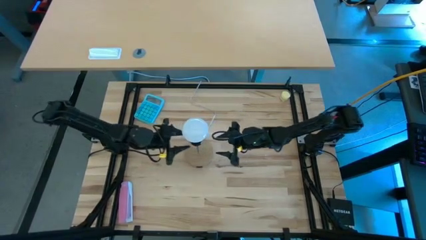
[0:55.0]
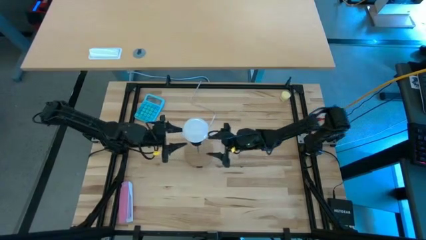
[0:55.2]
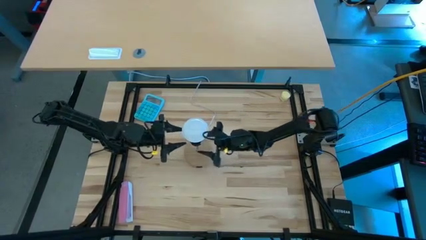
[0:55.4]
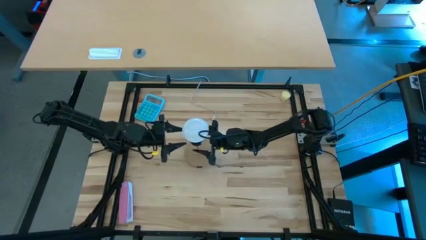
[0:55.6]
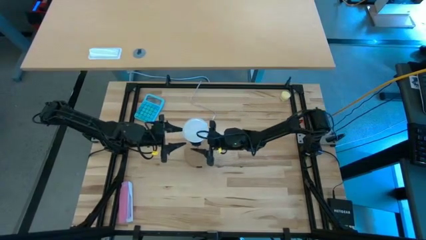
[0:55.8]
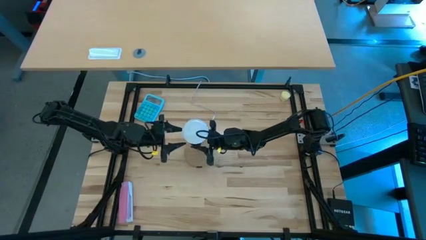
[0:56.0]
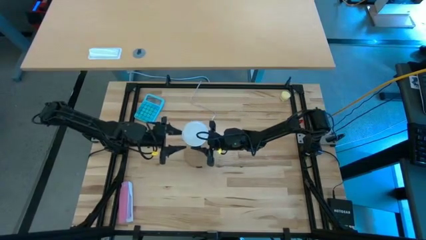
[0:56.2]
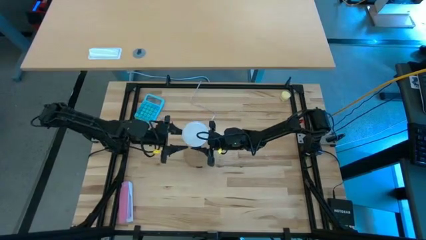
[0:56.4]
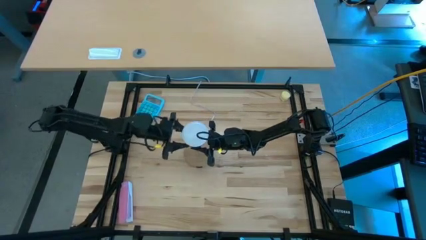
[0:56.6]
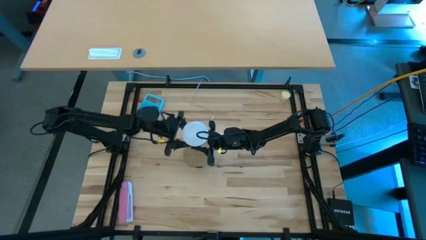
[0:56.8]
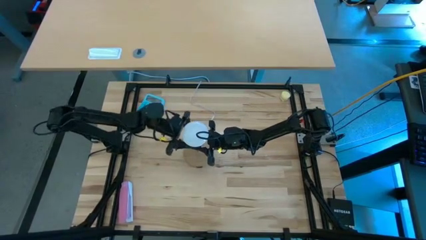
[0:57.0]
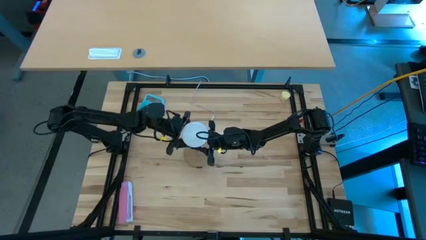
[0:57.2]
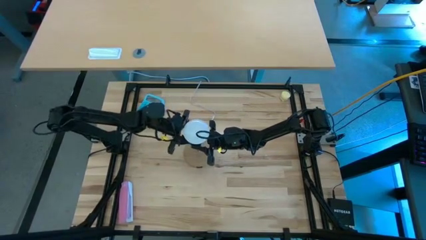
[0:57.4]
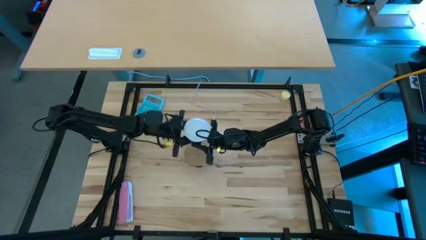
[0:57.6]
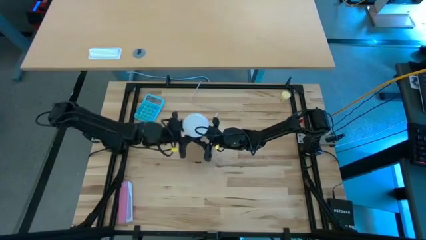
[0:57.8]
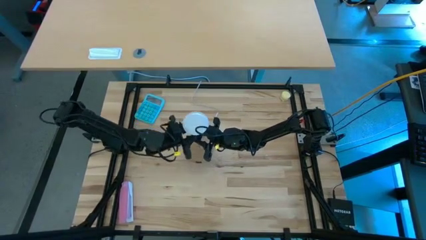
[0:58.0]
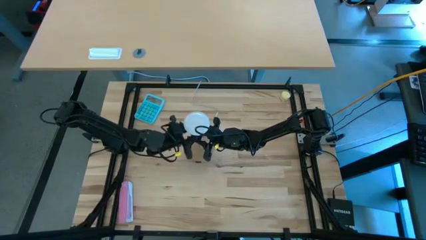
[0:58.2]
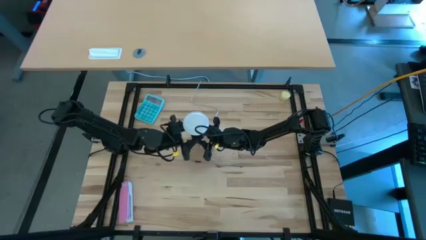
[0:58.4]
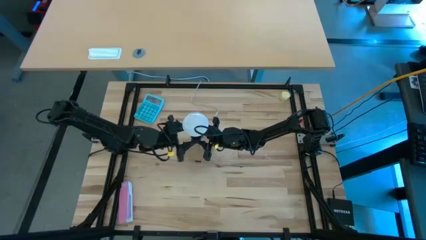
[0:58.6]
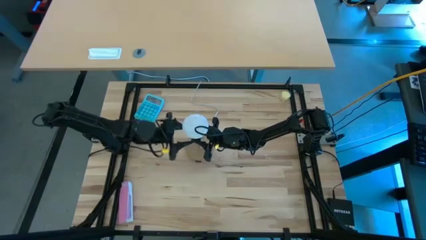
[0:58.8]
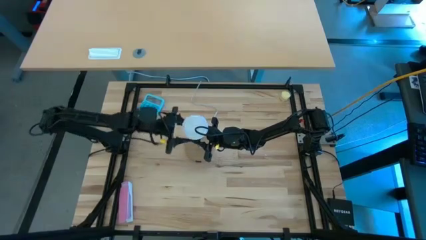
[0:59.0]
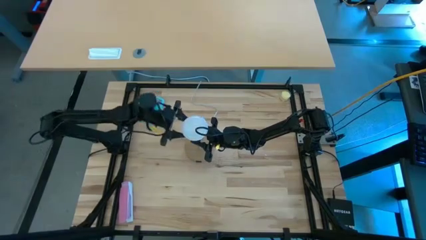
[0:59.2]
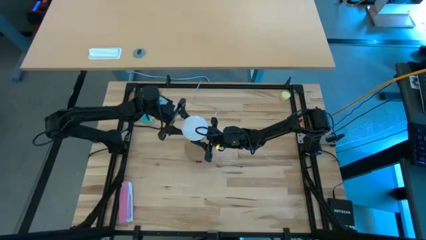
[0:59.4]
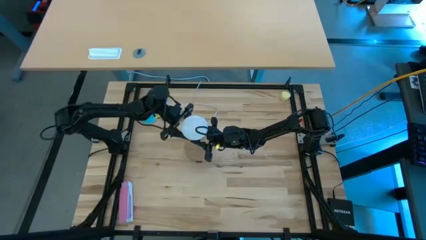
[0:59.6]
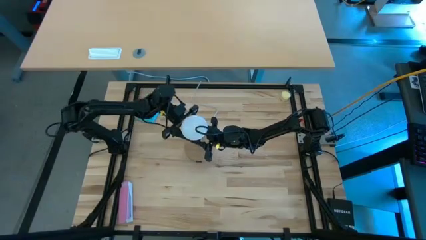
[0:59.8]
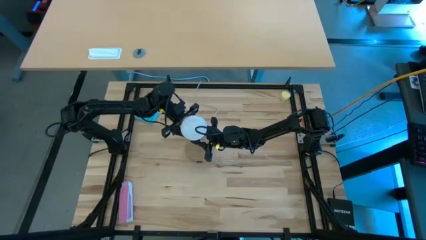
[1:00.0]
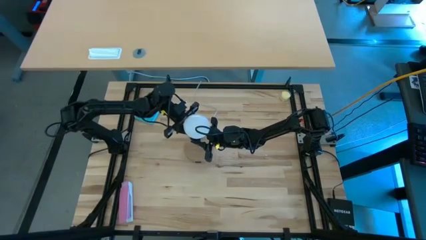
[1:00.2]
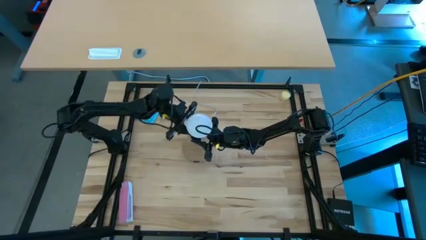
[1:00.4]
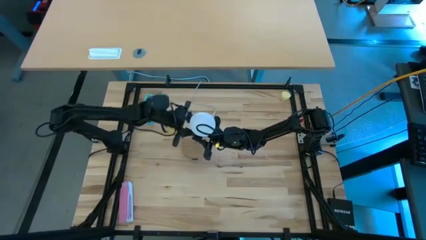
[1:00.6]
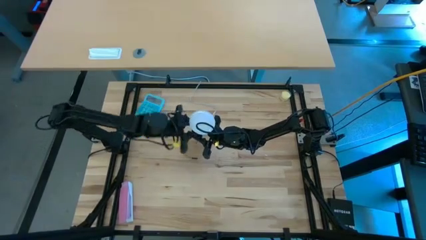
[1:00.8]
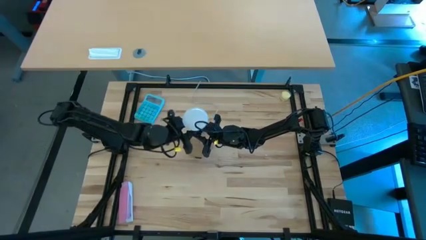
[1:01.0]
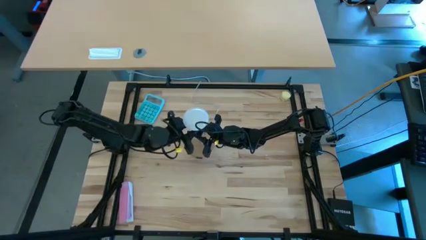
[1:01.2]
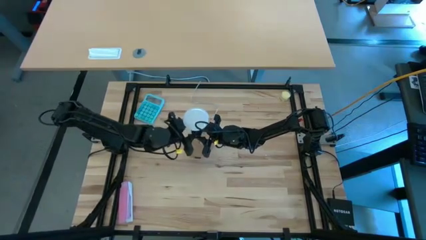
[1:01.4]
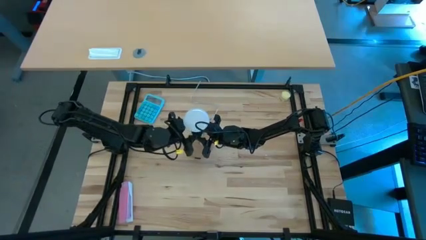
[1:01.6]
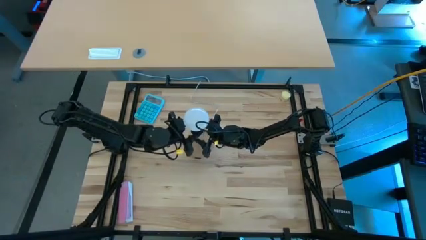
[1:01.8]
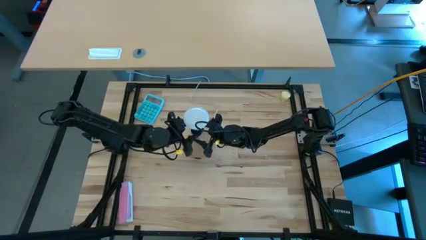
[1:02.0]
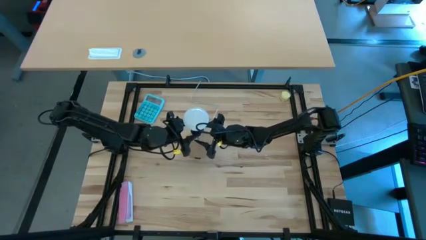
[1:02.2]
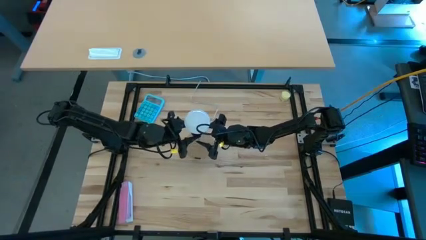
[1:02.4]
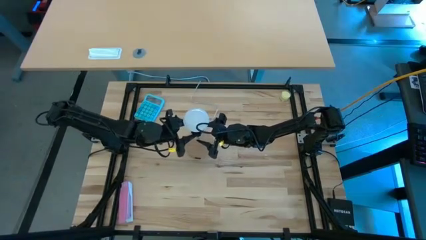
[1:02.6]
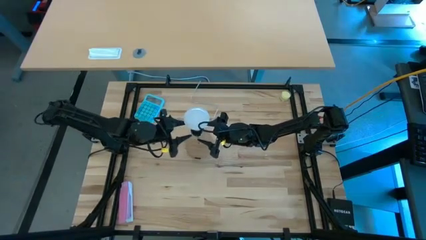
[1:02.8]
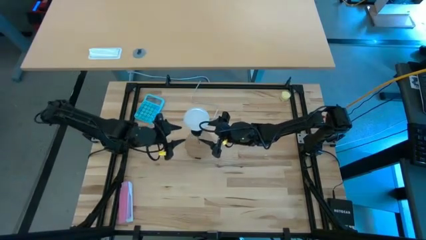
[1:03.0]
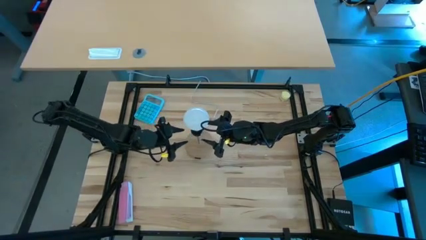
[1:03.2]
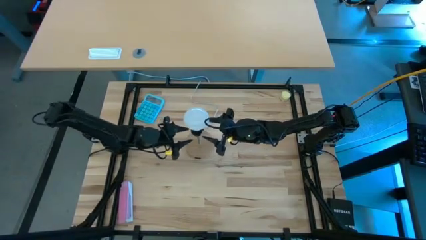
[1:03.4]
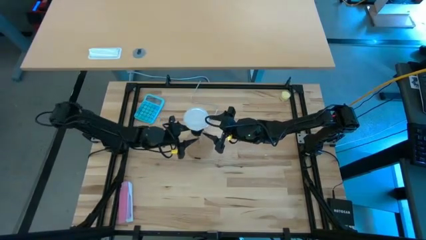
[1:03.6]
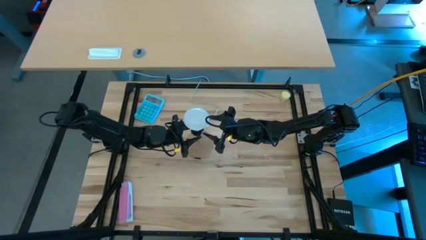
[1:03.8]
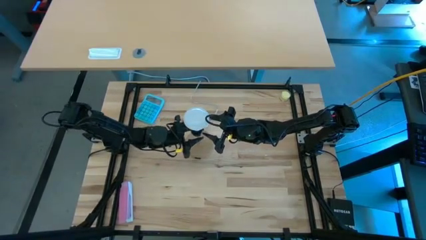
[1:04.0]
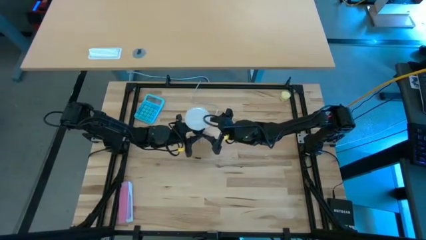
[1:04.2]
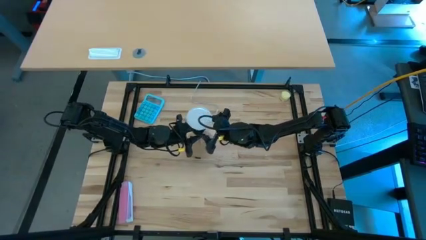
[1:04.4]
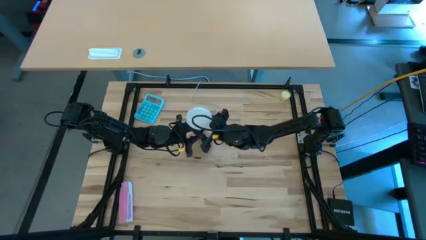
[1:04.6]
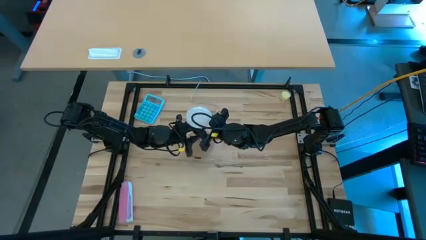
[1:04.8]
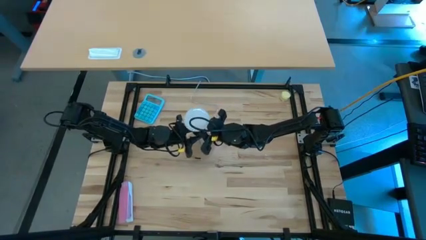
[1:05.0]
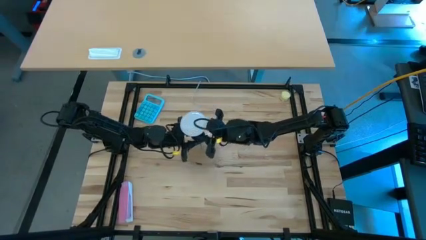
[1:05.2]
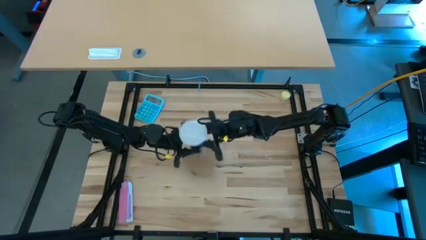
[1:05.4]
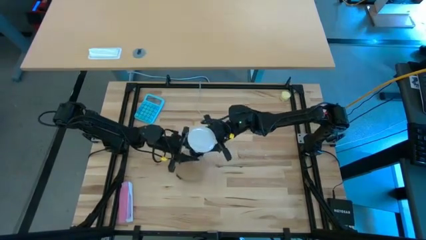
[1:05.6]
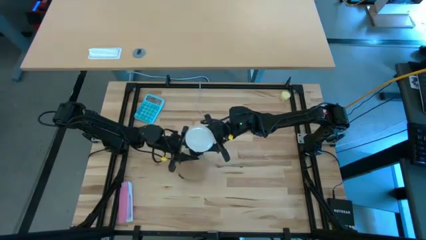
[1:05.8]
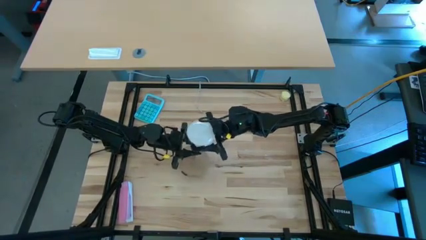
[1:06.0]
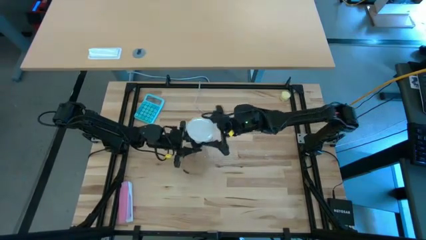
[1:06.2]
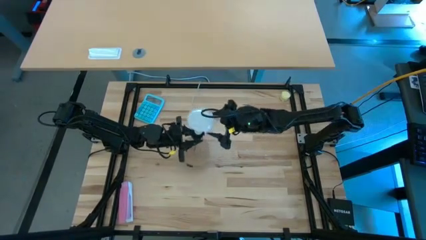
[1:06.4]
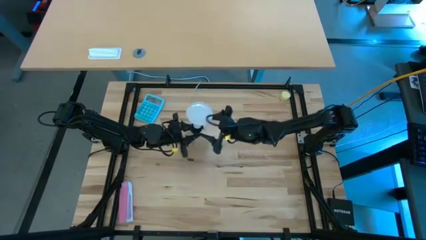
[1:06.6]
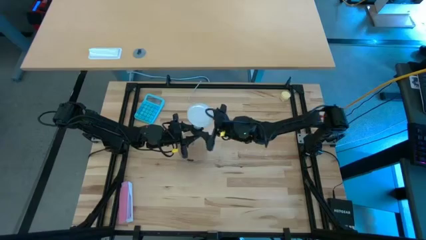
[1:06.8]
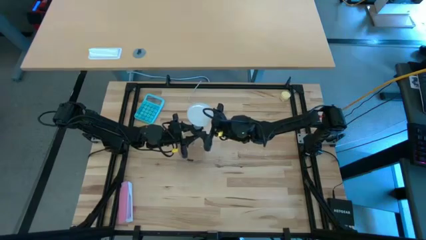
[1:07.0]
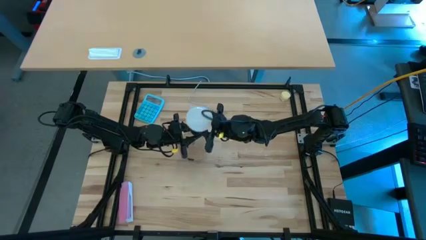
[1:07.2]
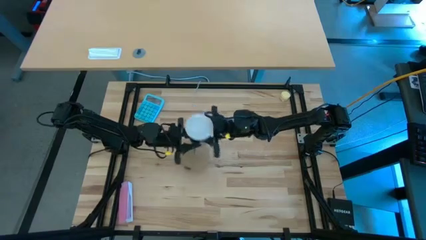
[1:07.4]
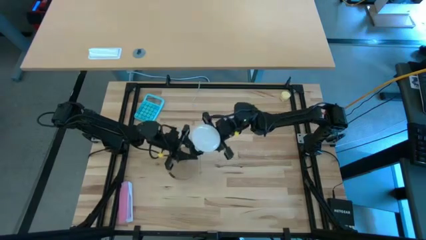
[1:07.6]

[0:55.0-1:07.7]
Task: Screw lightbulb
Remove the light bulb from the lamp

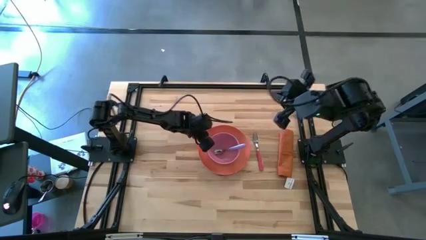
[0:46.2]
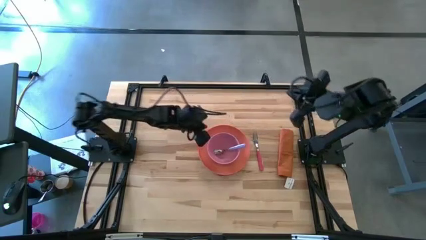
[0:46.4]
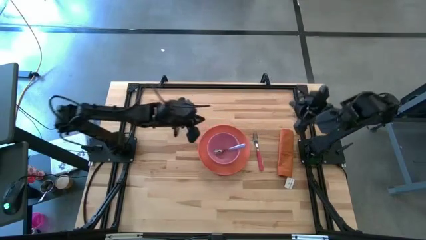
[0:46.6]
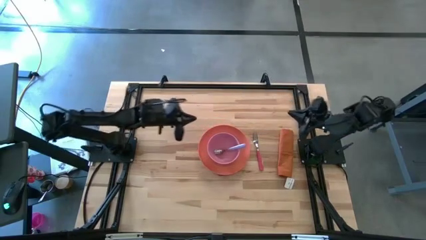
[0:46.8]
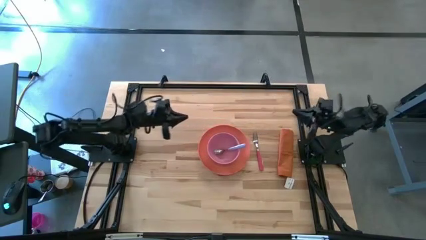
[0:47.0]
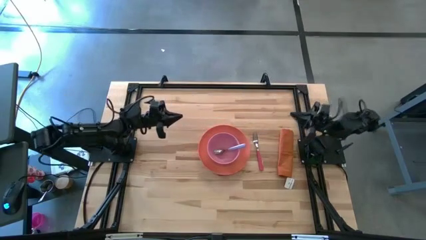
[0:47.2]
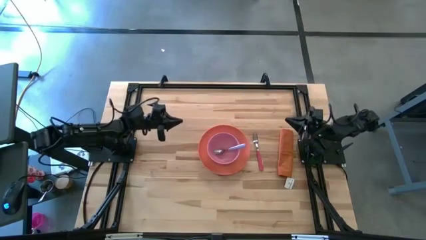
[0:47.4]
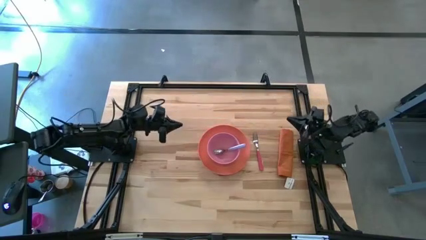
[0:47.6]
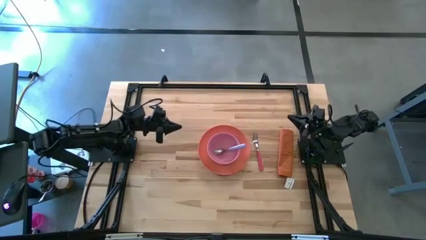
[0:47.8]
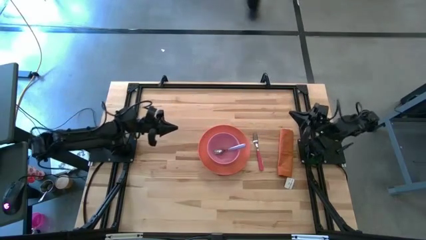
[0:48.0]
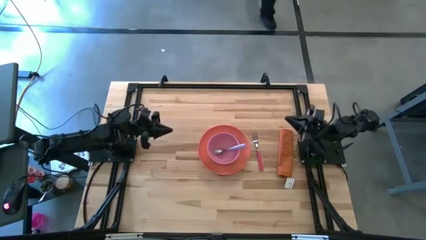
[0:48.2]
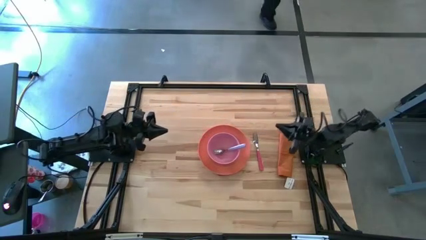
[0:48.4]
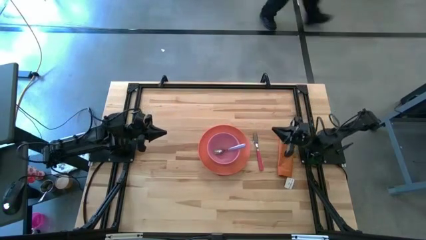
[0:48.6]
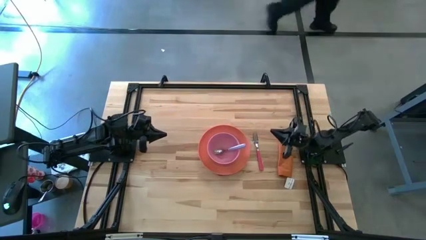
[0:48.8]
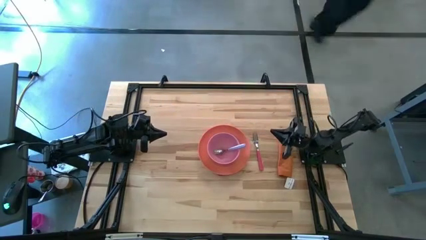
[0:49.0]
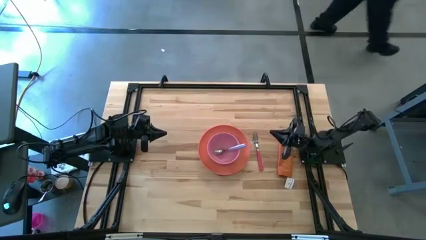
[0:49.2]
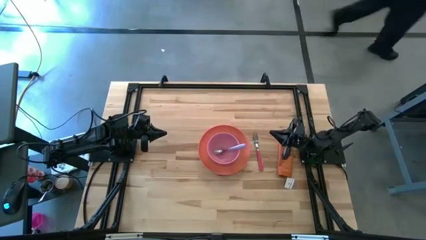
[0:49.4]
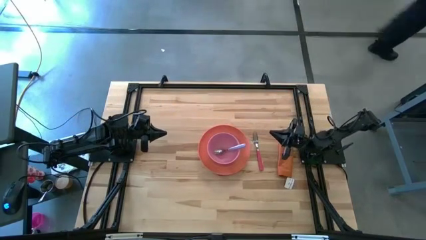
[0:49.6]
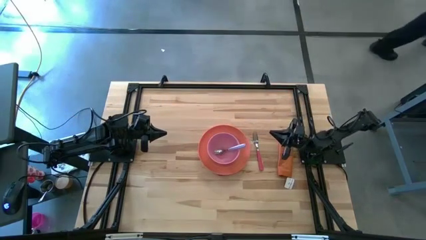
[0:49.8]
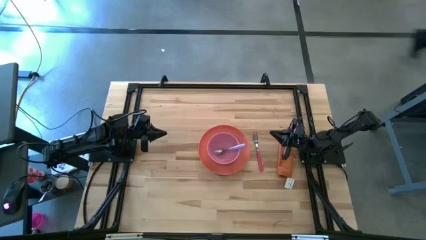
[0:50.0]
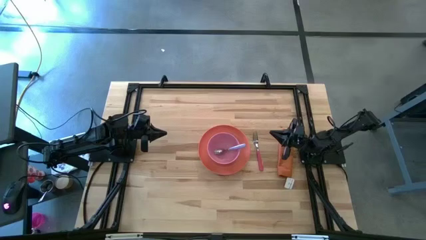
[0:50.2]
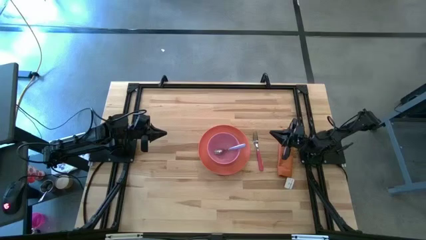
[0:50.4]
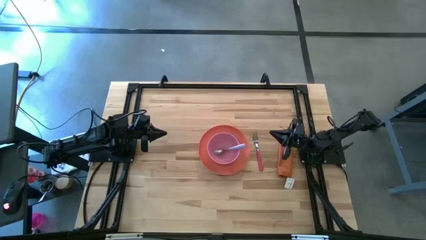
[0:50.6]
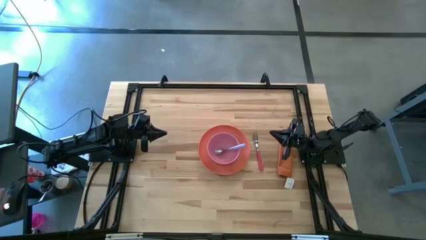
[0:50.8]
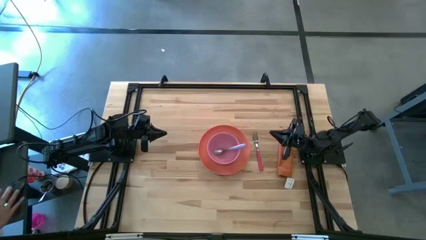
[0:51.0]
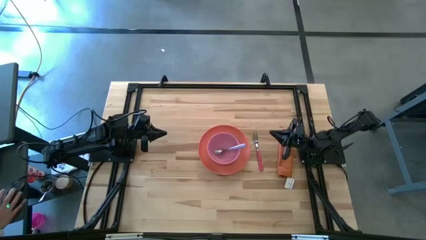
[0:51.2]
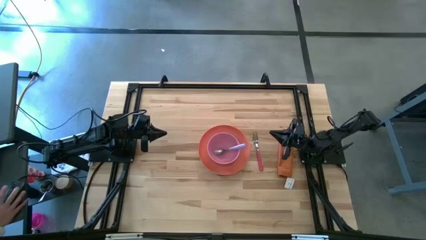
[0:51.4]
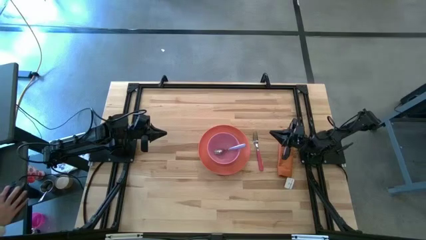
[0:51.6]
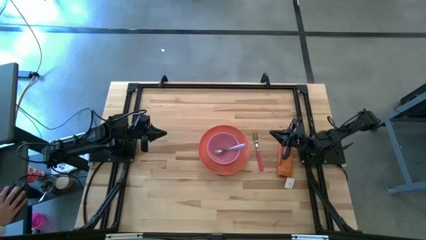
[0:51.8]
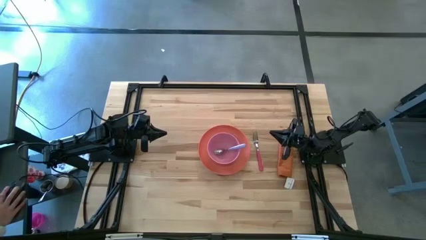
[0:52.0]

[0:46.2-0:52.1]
Task: Set table place
Return to Home Position
